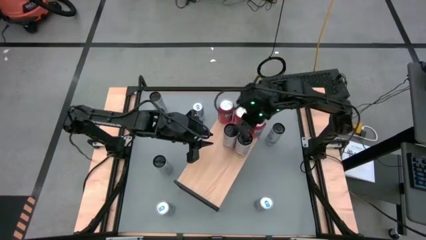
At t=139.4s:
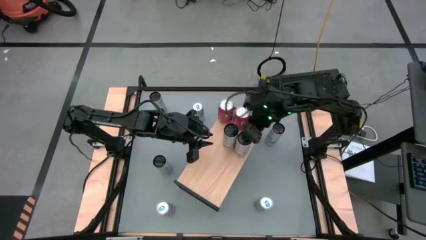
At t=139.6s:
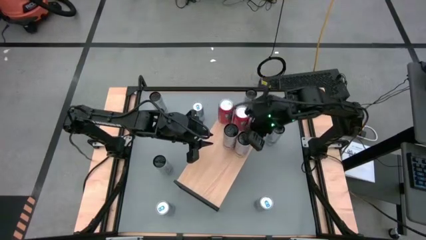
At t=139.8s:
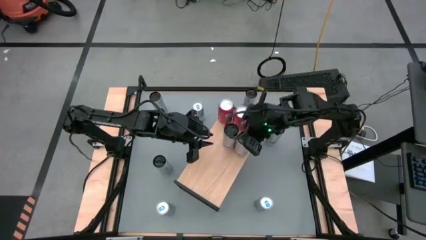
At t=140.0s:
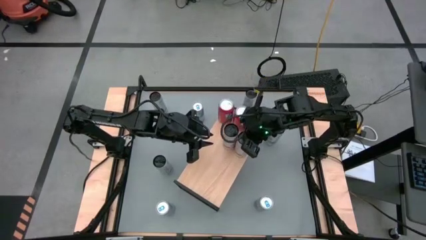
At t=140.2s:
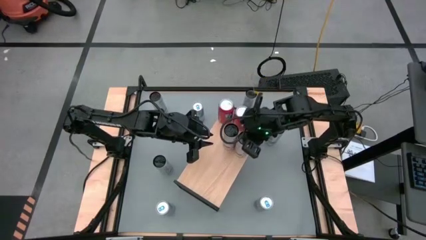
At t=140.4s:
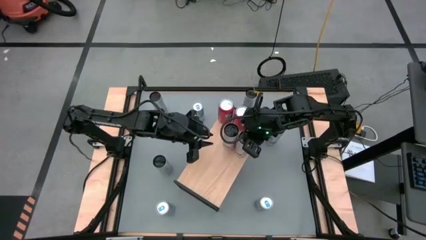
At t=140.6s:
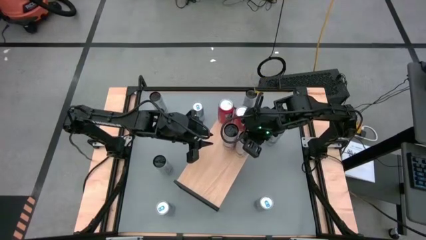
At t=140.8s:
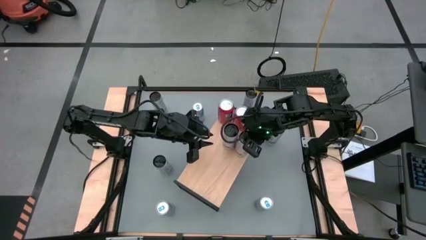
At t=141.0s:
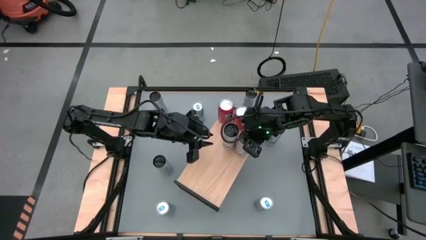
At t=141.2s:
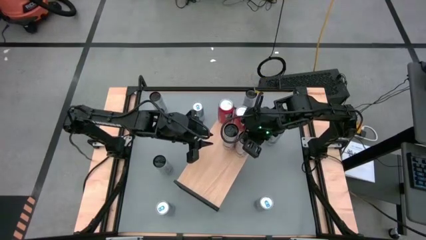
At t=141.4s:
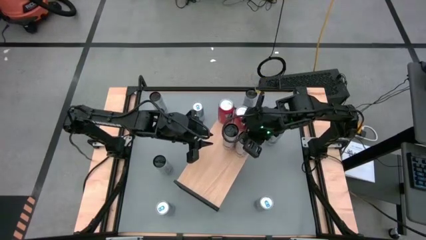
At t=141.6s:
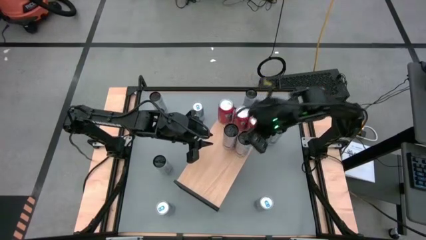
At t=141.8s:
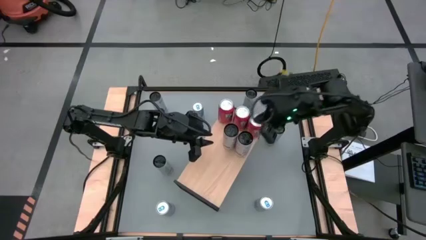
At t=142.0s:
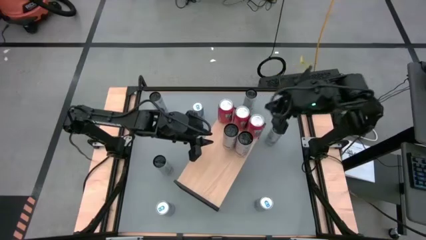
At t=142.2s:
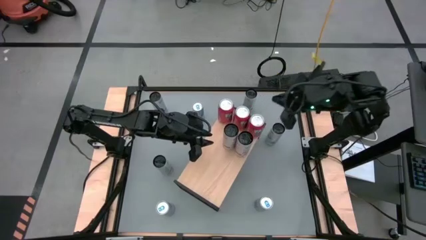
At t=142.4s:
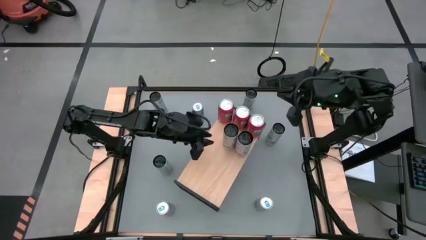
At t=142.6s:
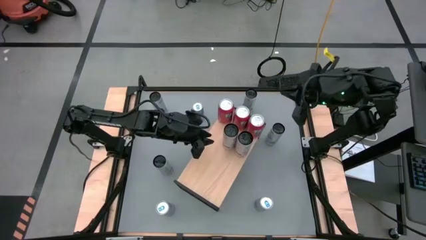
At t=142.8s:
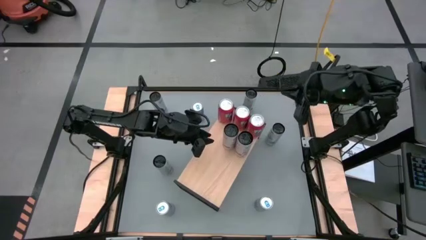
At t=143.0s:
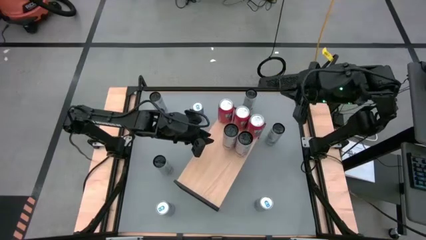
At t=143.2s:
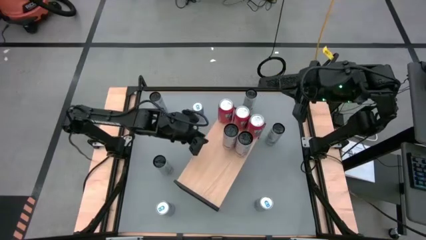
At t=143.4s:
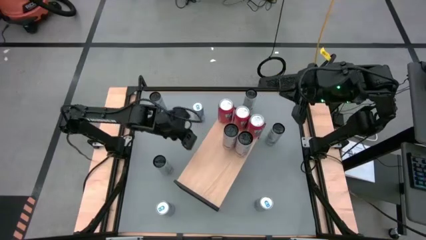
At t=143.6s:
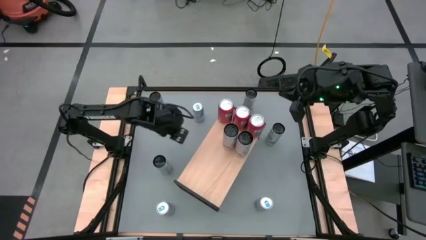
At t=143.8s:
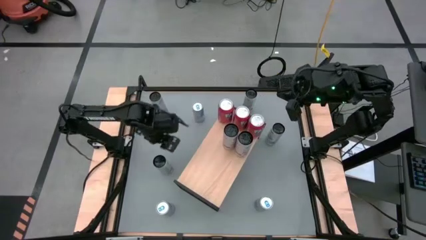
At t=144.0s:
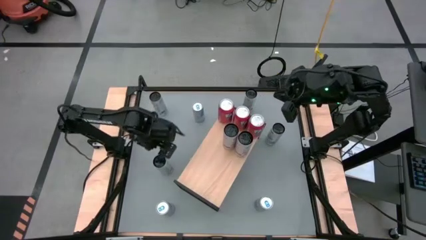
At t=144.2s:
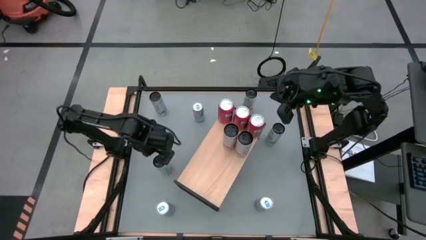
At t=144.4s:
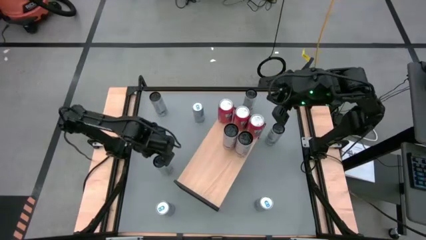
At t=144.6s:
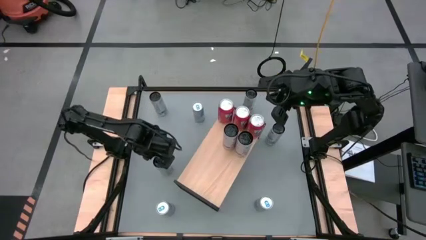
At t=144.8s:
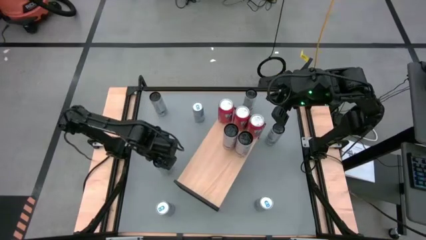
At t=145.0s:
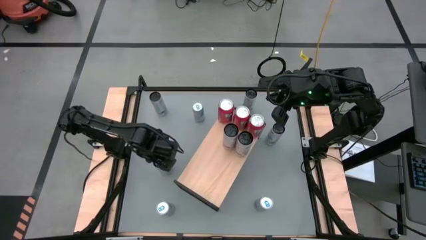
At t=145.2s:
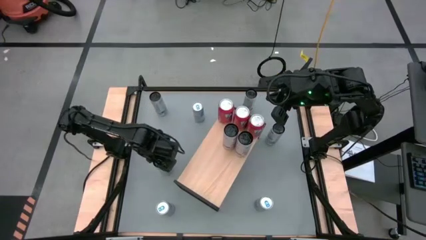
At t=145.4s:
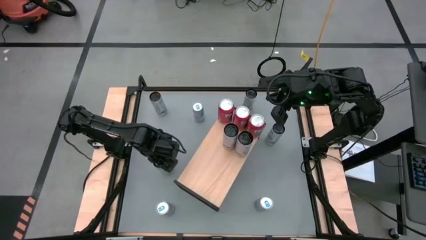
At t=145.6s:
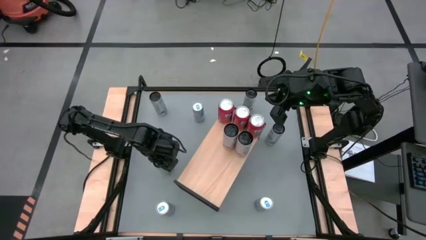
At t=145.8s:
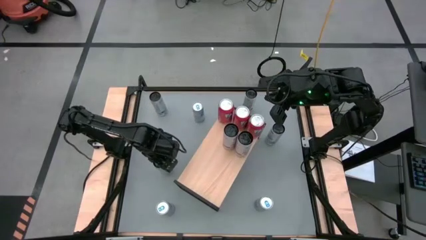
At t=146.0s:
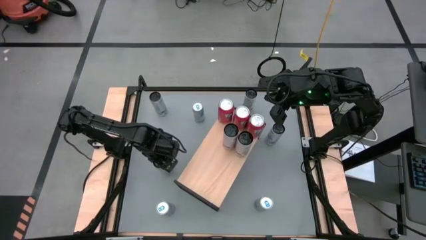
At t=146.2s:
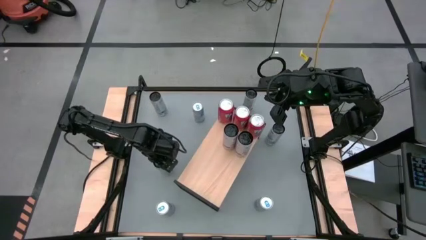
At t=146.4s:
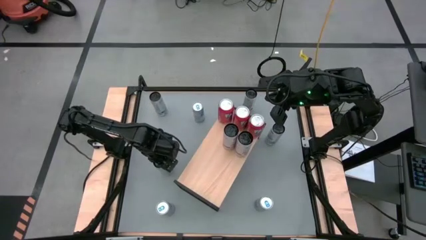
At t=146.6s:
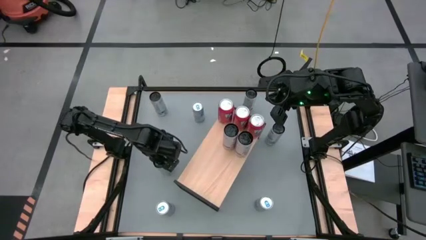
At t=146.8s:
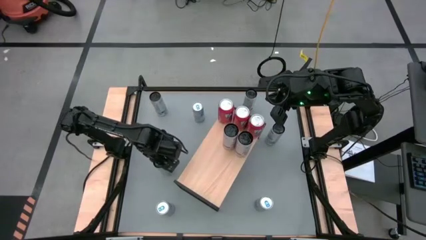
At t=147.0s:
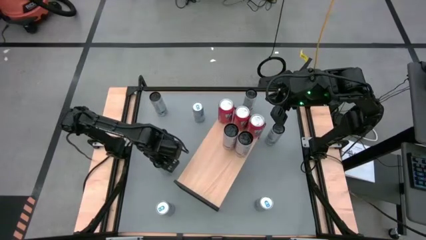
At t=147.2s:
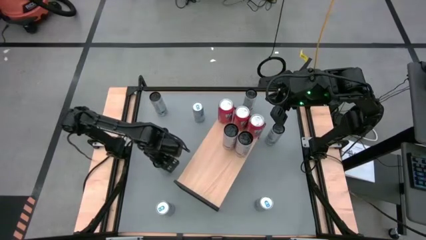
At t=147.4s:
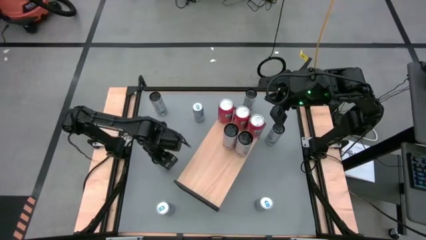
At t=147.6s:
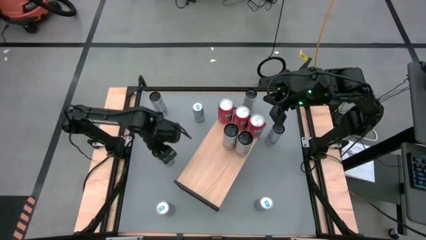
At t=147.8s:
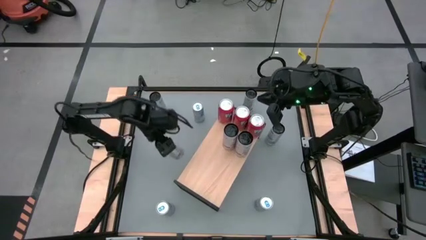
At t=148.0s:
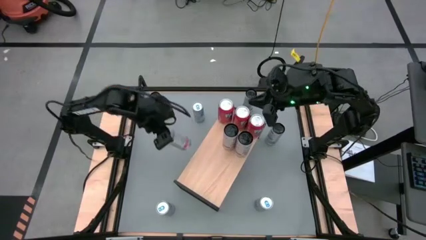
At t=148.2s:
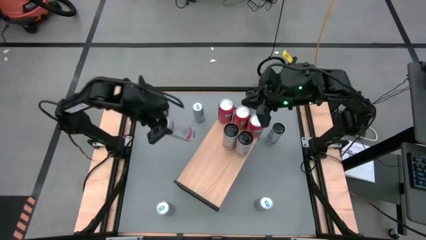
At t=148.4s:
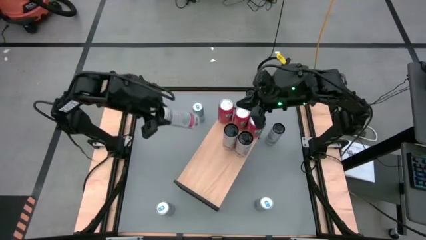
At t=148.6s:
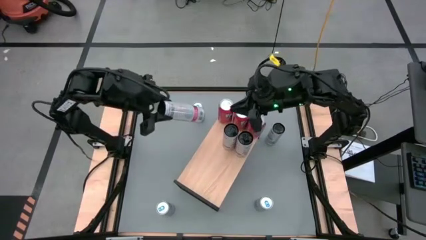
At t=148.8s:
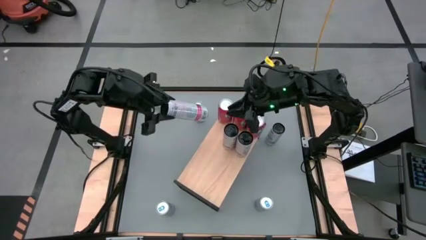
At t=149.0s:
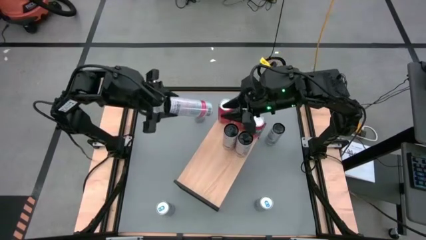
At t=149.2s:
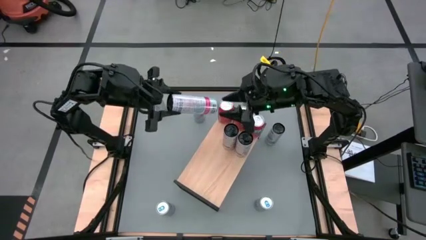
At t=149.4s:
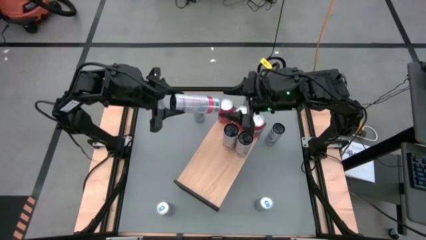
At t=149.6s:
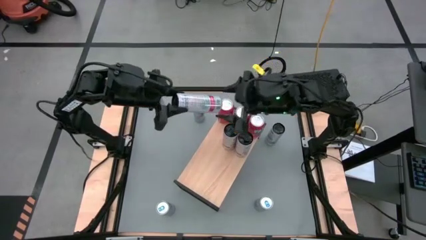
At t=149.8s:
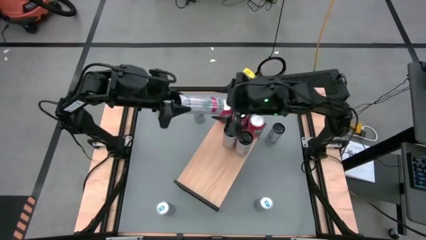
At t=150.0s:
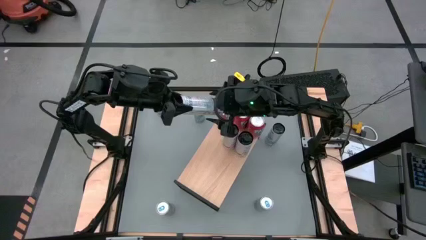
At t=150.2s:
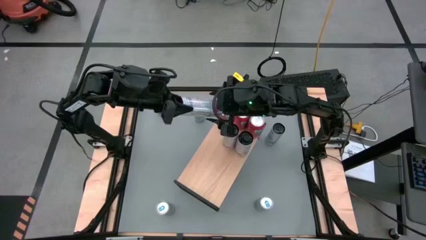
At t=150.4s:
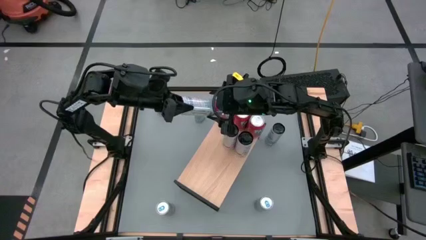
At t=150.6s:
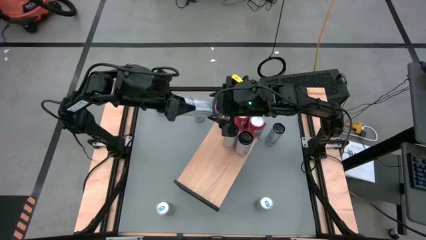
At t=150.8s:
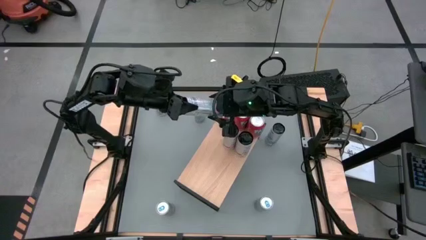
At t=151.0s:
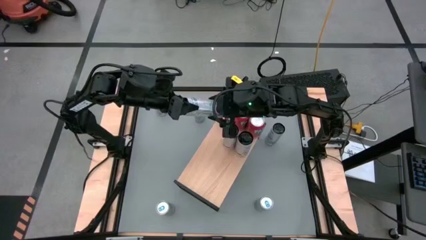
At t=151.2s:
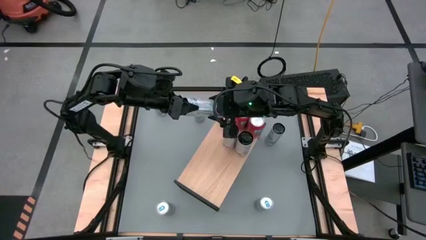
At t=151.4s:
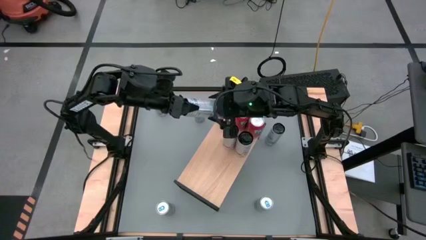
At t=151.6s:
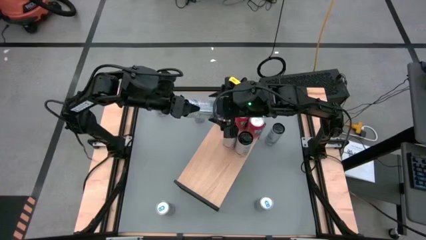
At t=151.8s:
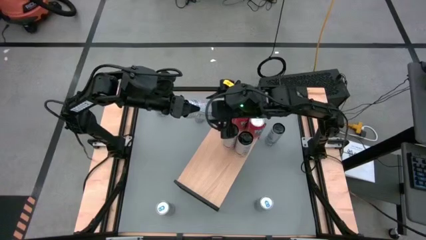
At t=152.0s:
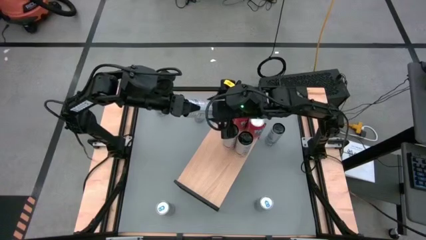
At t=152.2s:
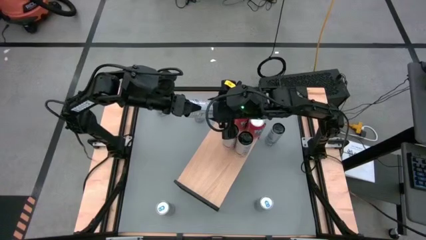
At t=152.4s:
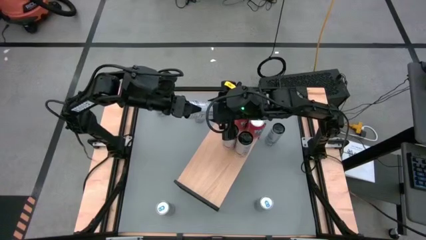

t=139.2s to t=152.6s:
Task: Place canned beverage on shelf
Put the white pink soda can on the shelf aligned with the other white pink soda cans

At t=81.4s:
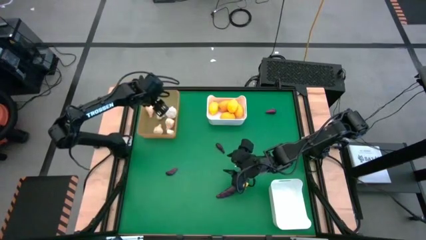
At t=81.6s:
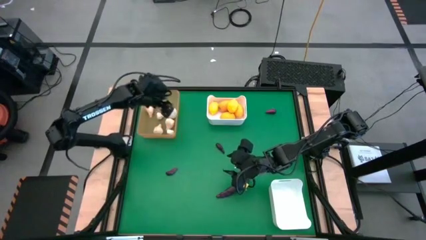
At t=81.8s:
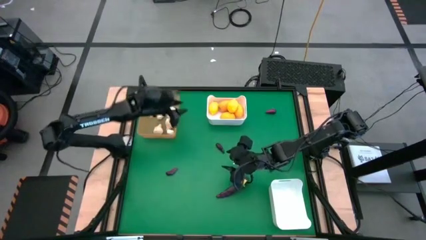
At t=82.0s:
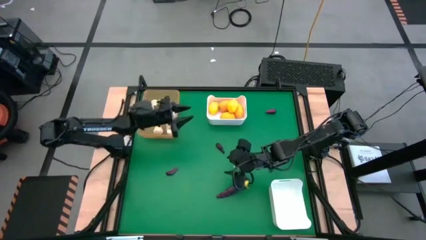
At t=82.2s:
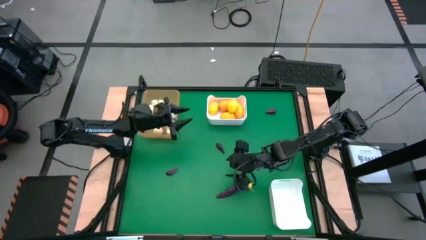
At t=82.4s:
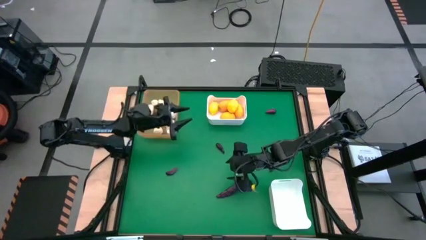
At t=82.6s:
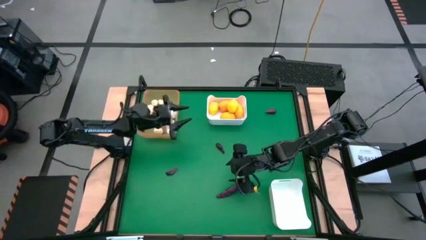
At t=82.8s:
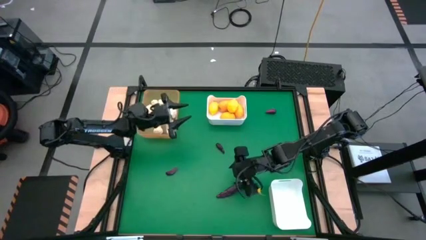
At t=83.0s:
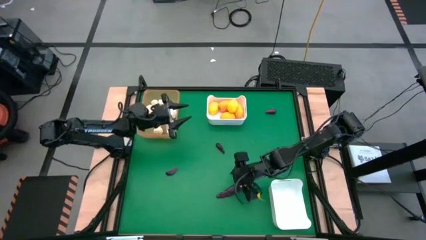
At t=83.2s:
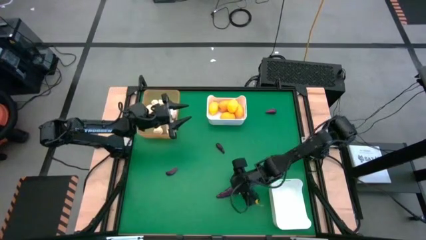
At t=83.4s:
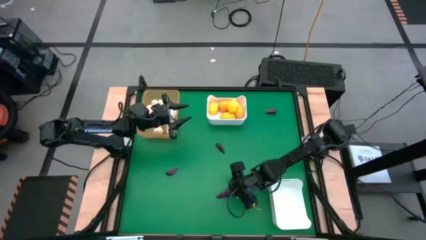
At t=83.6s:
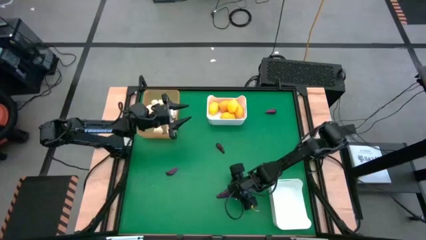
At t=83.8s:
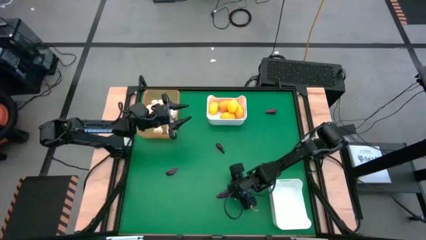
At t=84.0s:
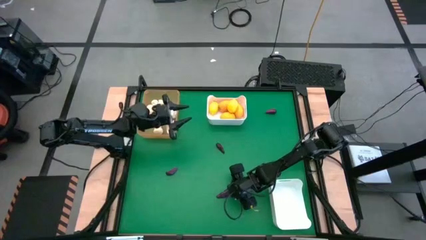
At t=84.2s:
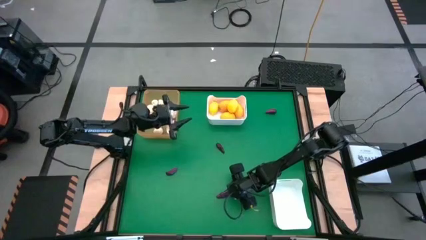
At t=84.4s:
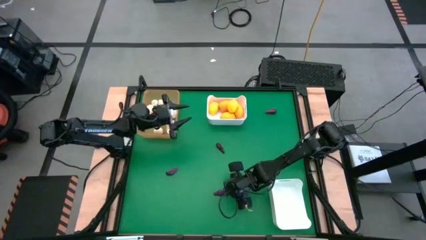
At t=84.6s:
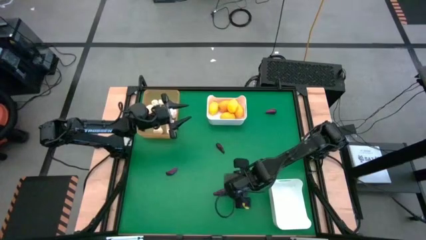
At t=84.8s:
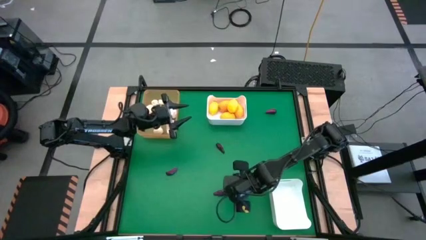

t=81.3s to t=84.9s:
Task: Sort produce into baskets
Put the eggplant into the bottom white bin
